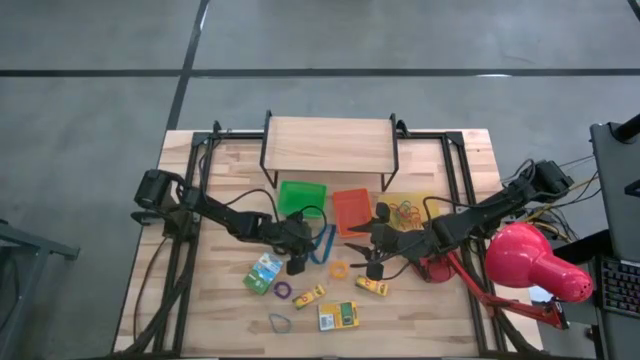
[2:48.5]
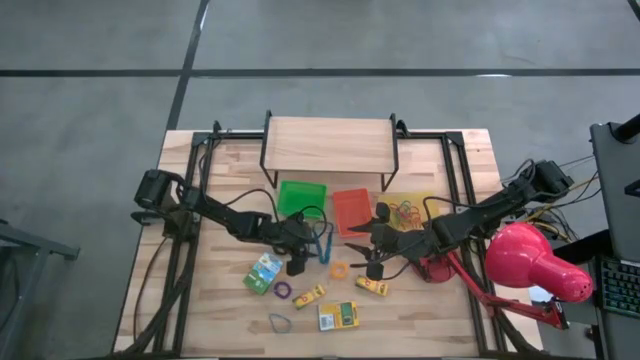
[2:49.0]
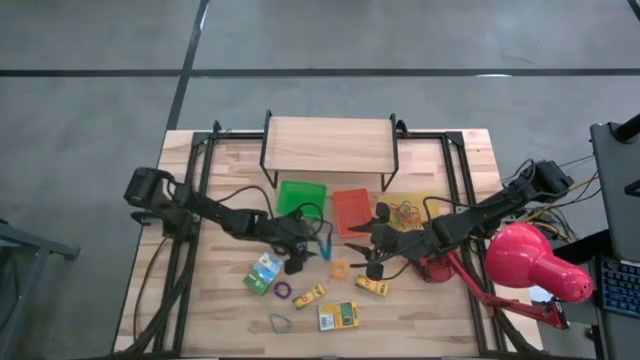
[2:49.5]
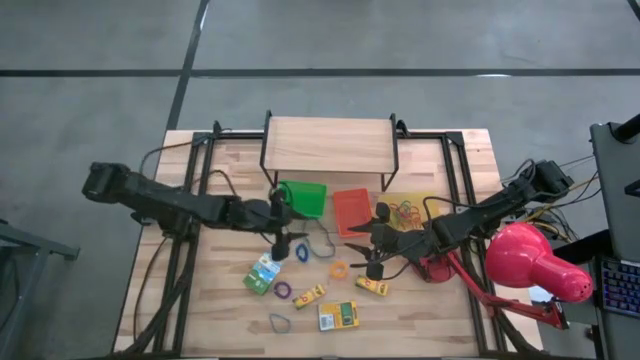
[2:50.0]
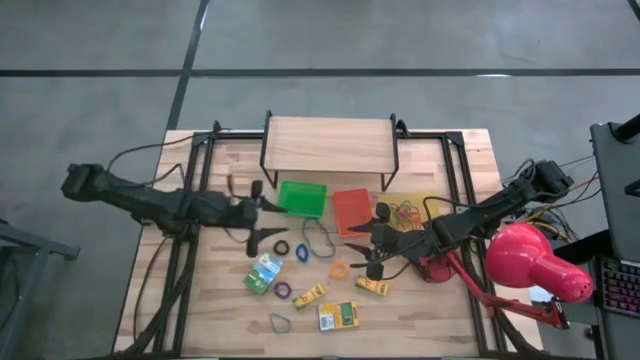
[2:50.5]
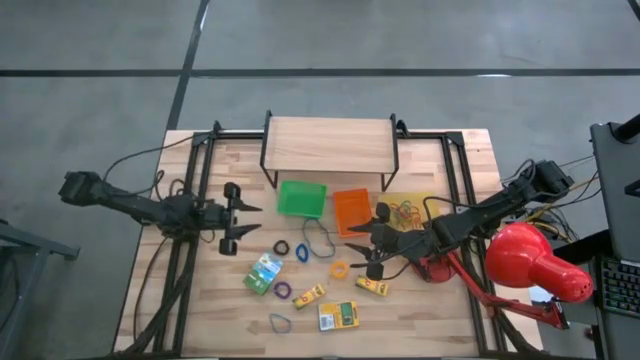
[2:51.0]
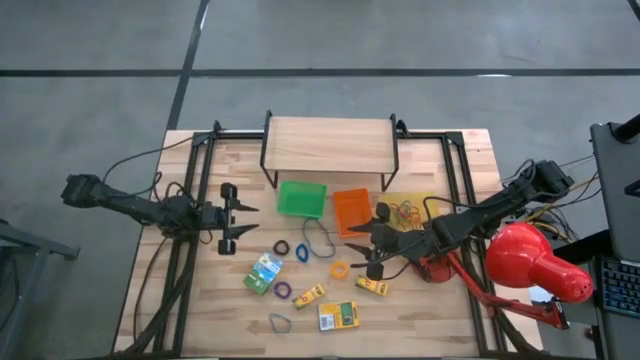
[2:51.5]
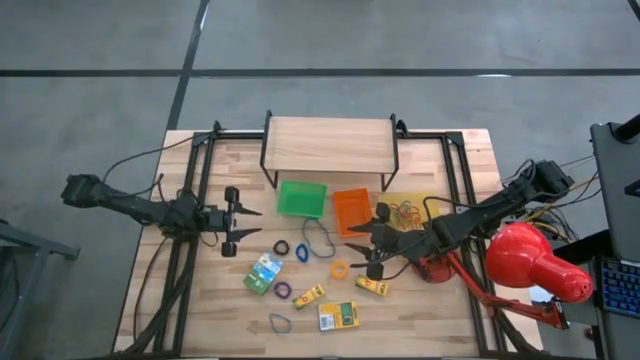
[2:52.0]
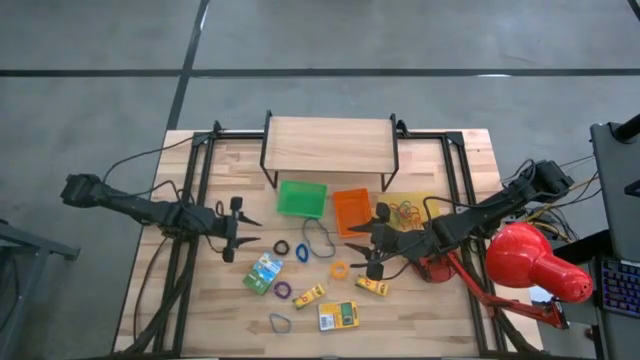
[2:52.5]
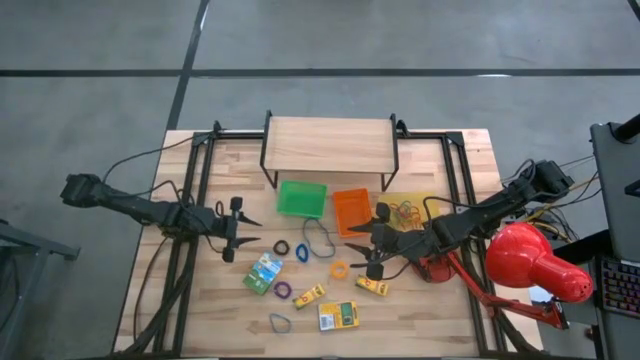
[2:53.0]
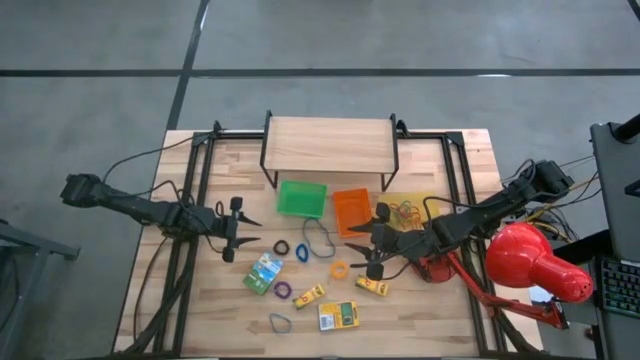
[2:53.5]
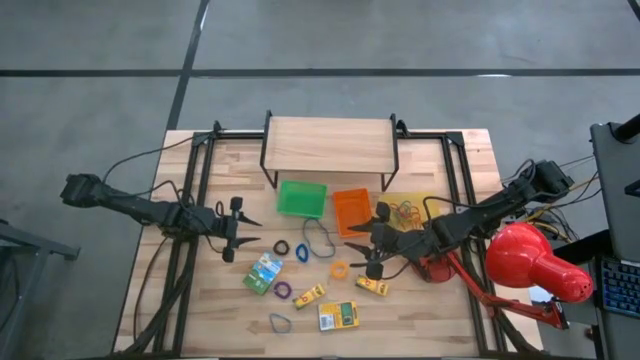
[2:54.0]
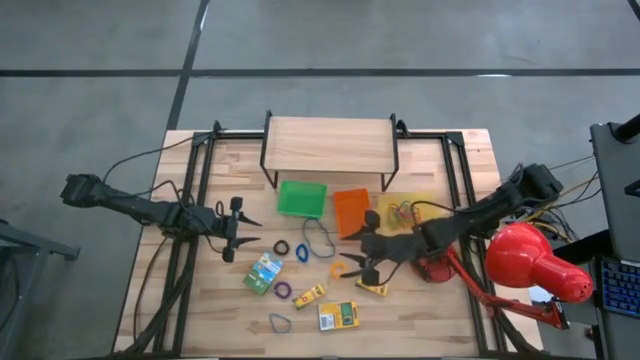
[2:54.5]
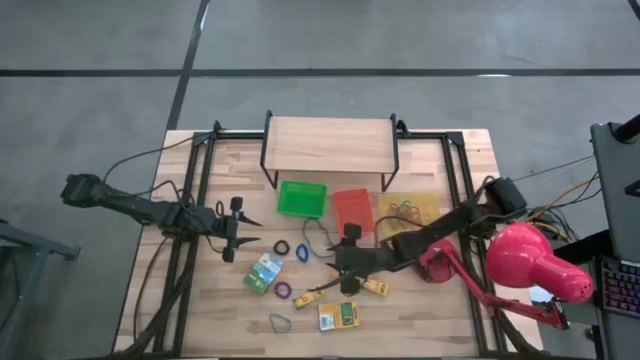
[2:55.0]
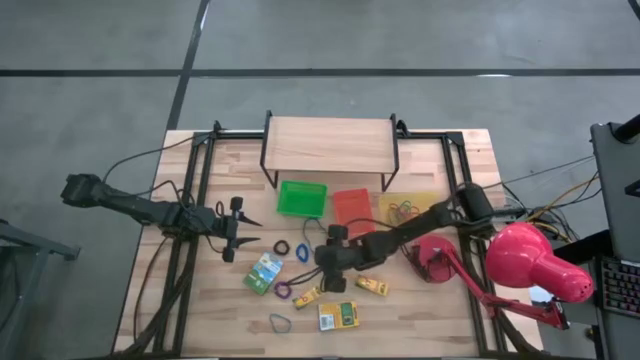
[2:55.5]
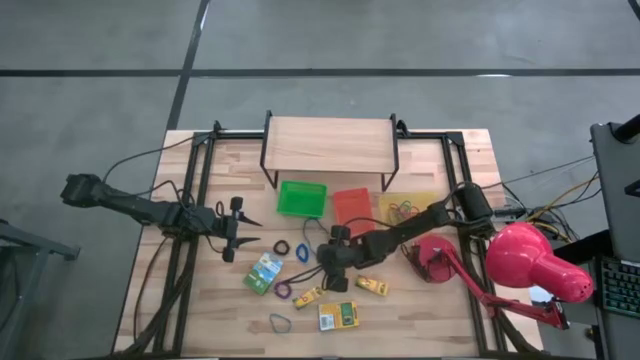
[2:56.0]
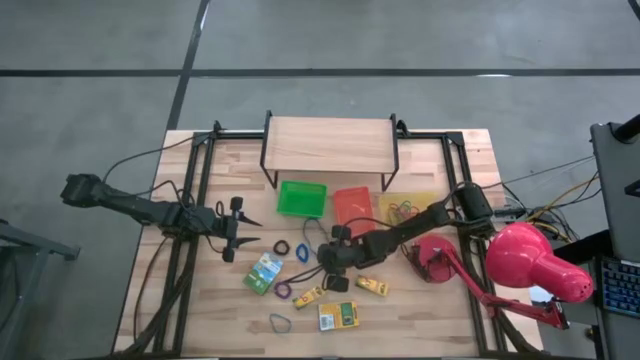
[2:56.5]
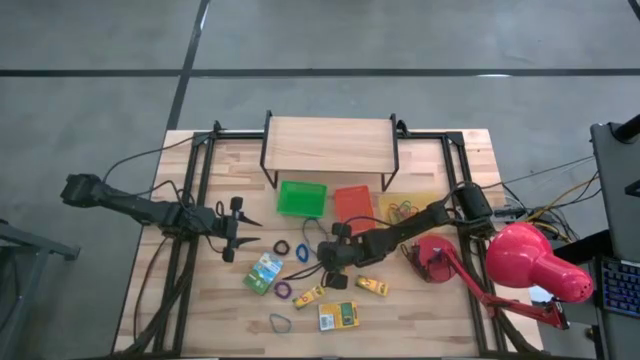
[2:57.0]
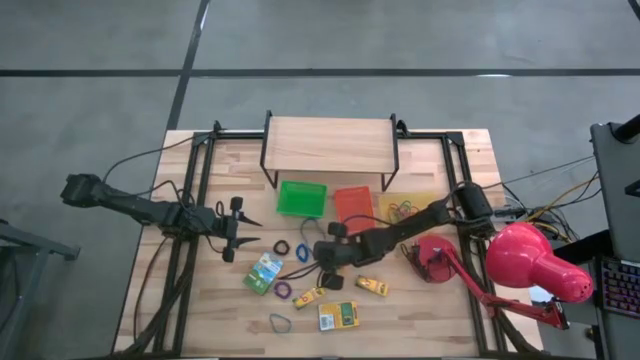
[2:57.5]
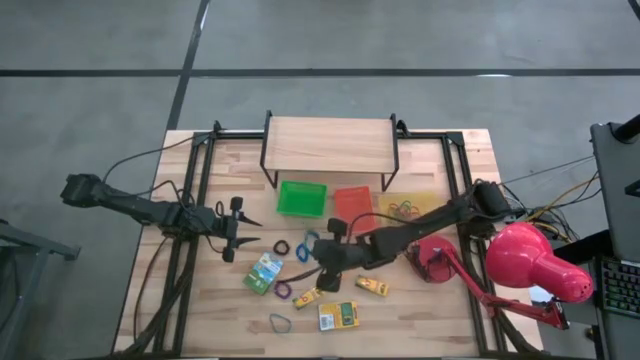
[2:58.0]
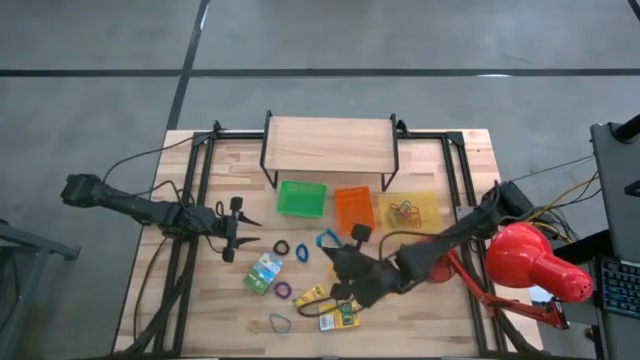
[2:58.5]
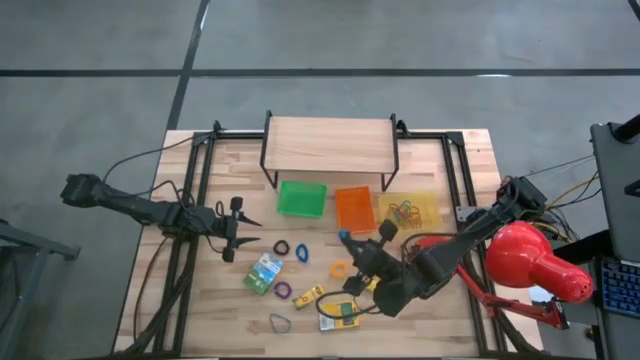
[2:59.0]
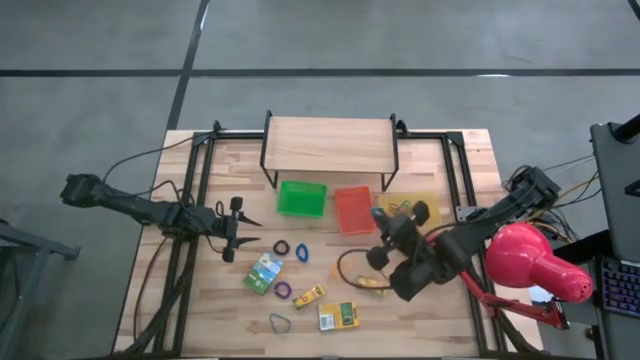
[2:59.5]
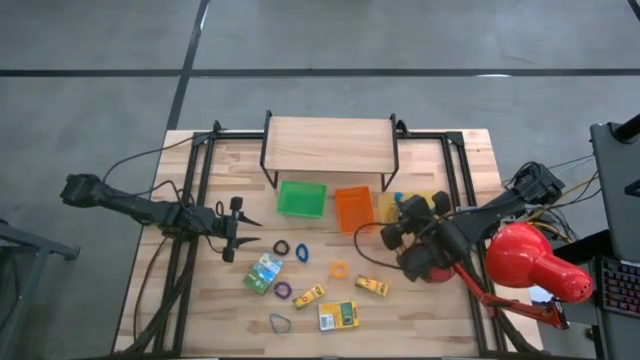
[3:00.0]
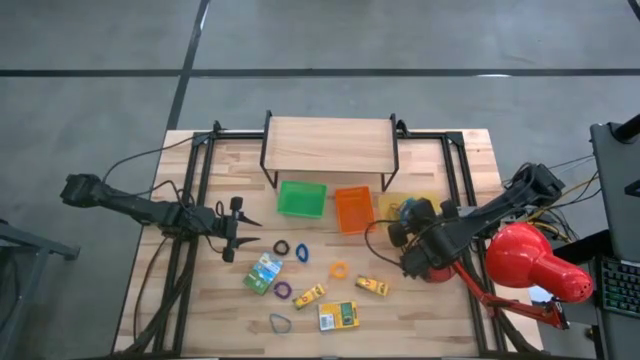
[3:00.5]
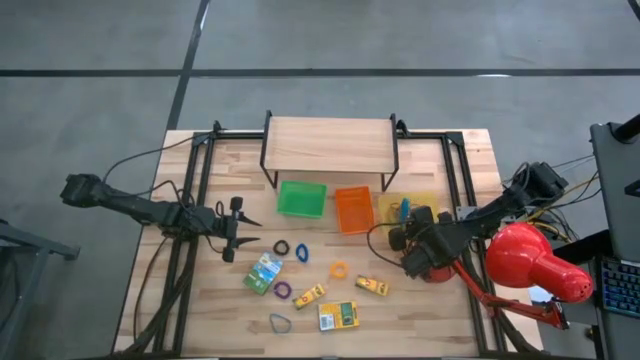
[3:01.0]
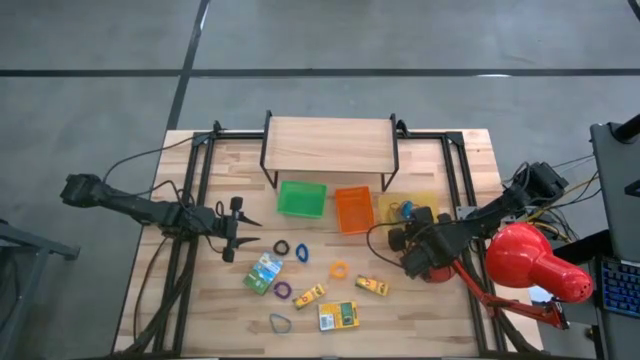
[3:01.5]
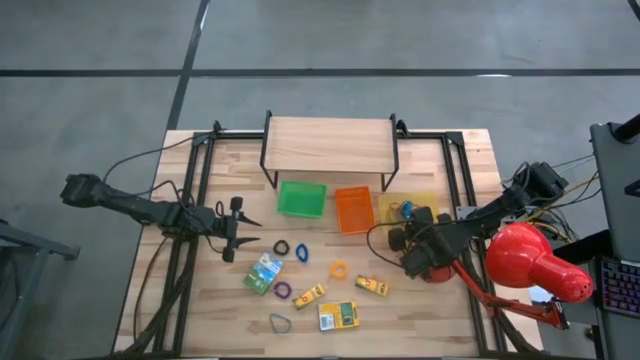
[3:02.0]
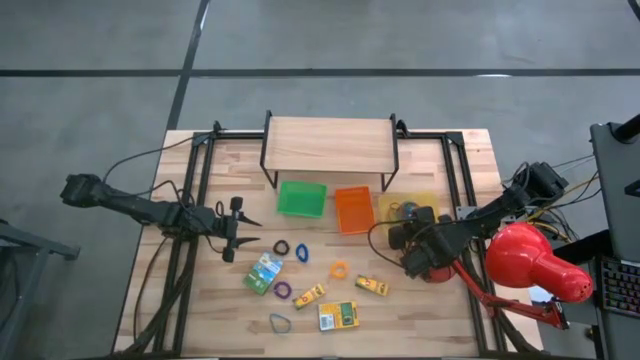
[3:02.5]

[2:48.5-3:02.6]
Task: Pick & Place Office Desk Supplies
Put the left blue rubber band into the yellow bin

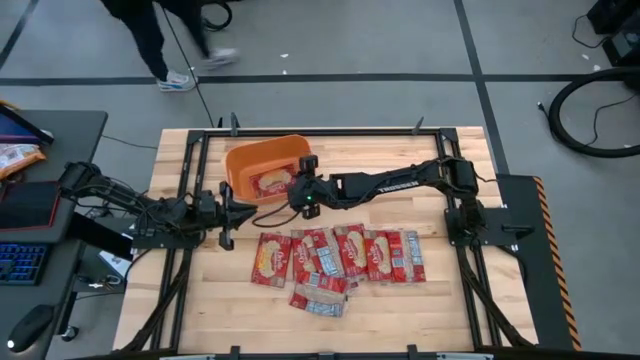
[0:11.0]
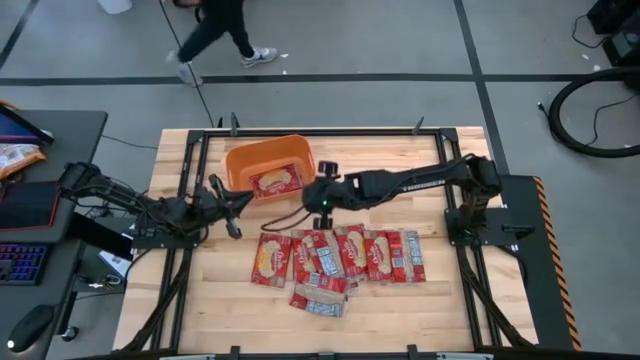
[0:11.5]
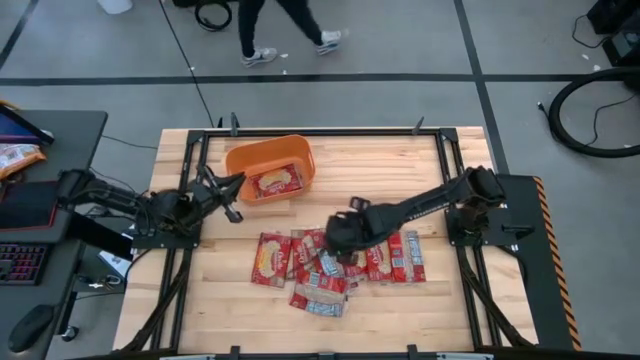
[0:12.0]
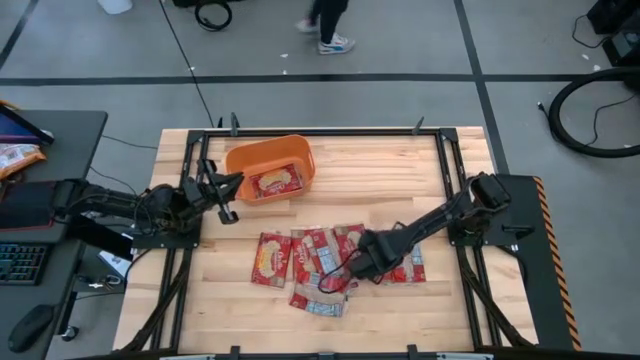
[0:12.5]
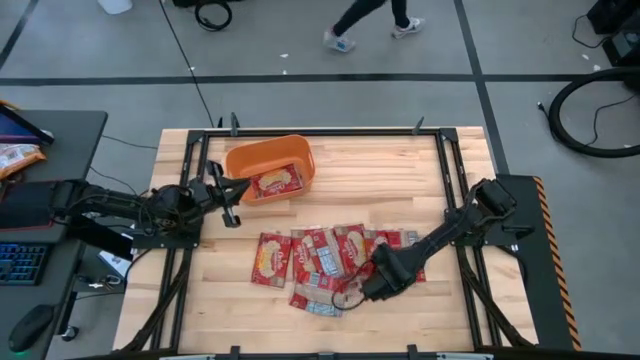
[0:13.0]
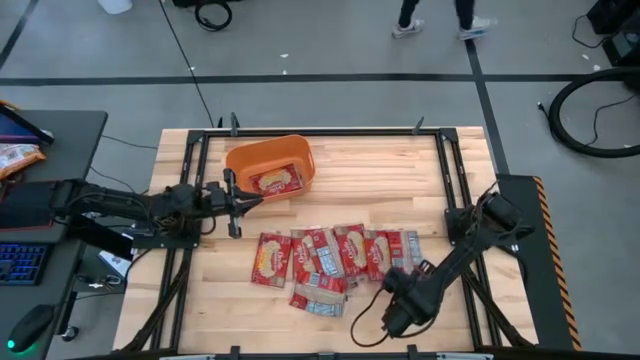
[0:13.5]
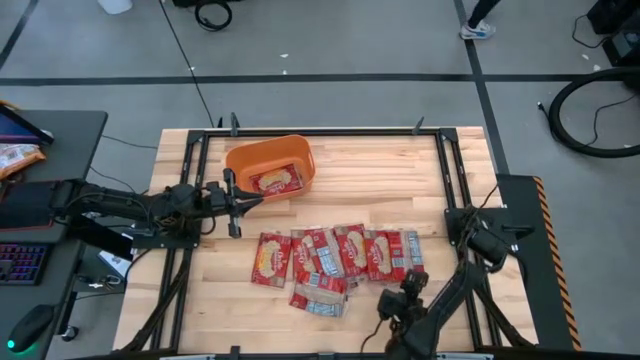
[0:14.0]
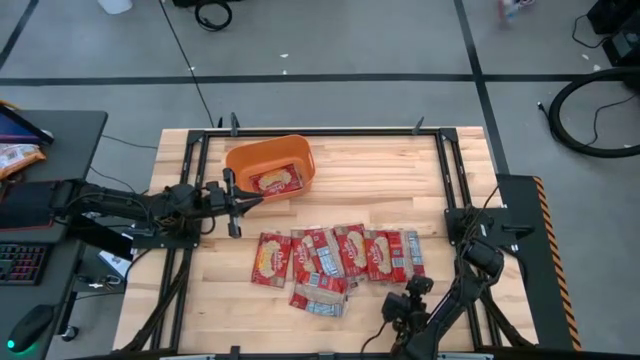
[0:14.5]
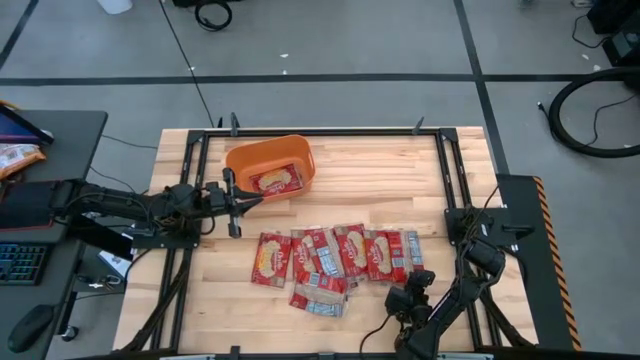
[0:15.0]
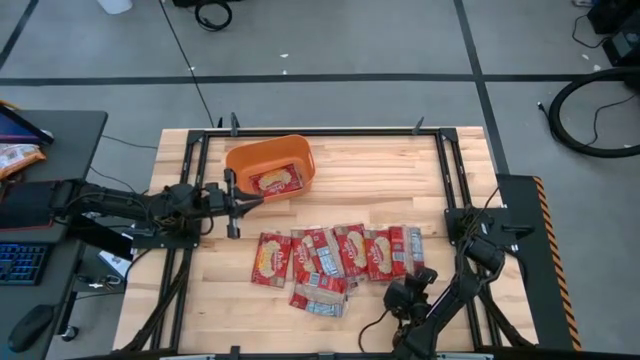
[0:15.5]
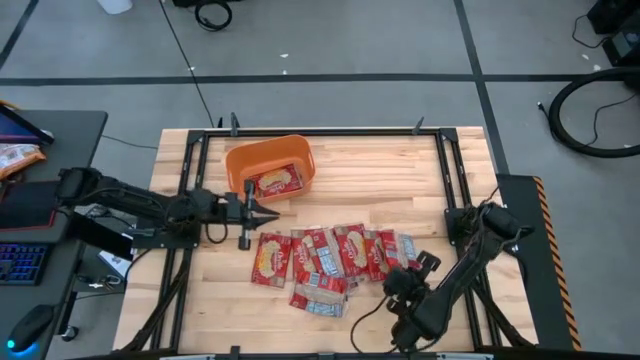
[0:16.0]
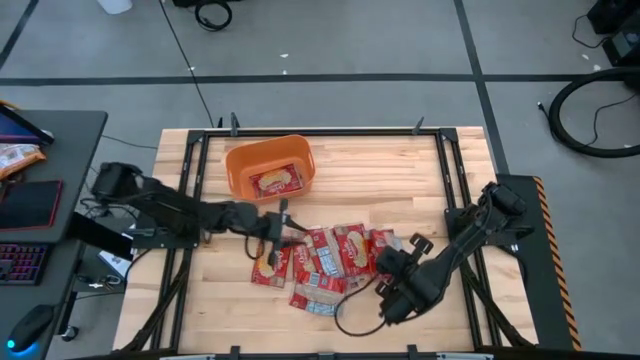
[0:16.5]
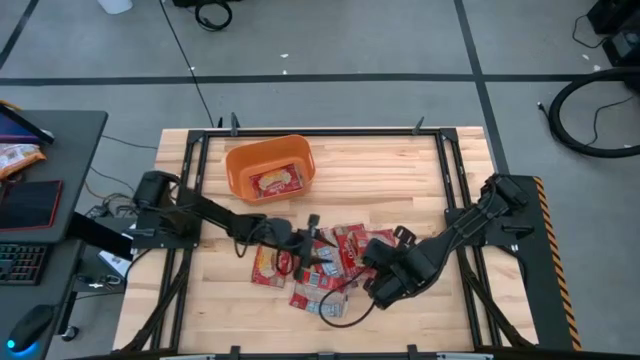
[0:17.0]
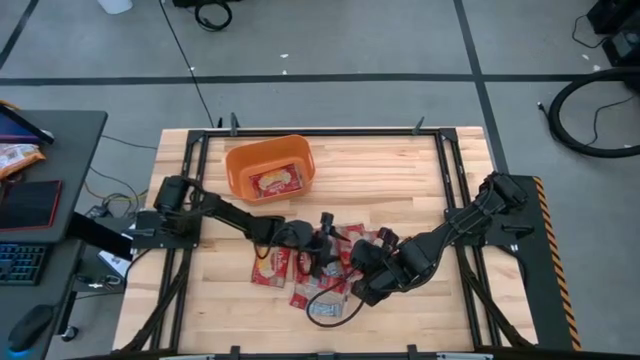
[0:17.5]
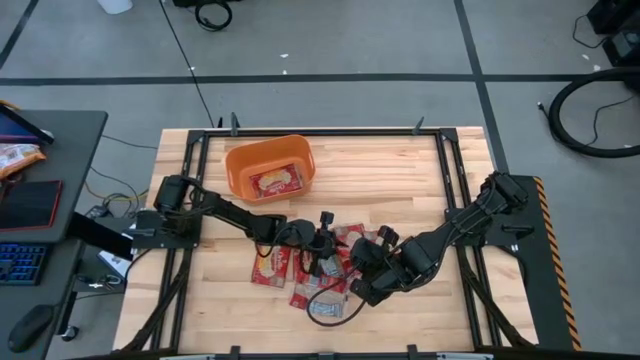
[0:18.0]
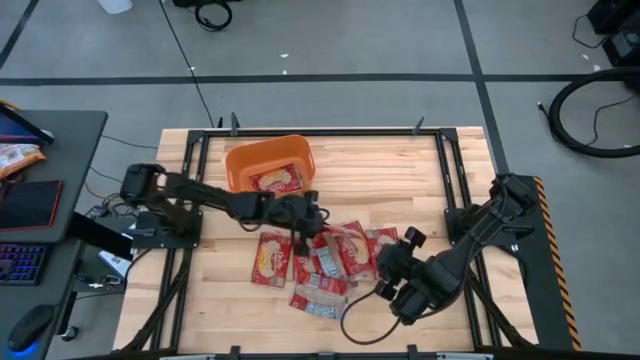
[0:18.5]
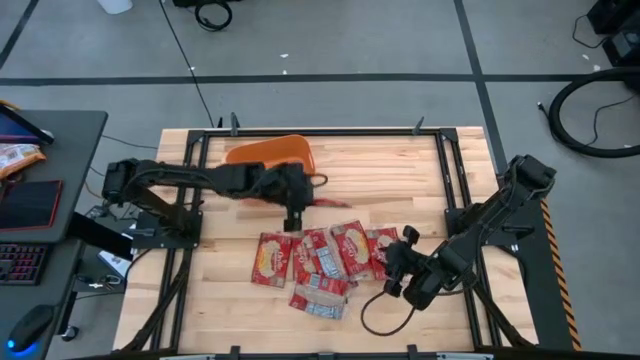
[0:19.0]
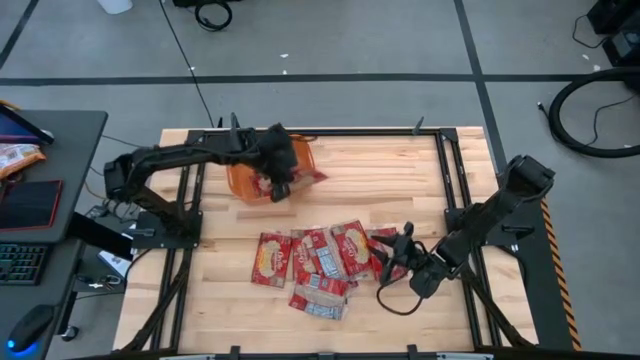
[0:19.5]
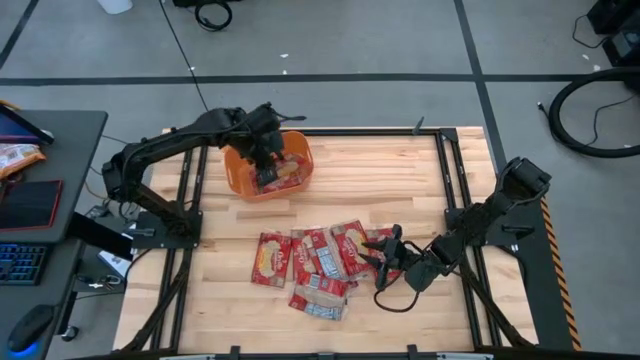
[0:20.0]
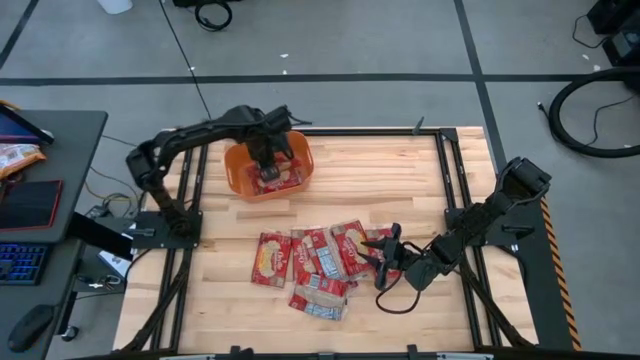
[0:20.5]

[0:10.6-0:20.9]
Task: Sort popcorn bags into baskets
Put the red popcorn bag into the orange bin
